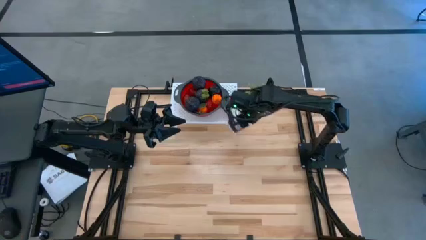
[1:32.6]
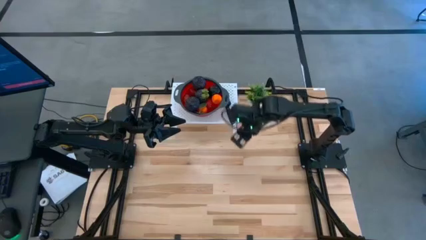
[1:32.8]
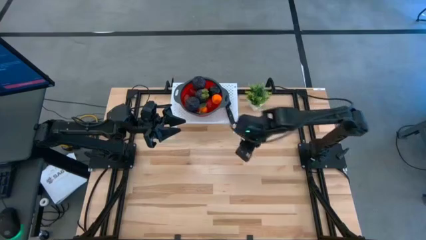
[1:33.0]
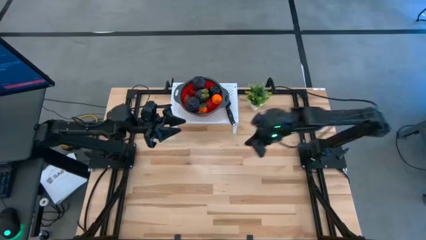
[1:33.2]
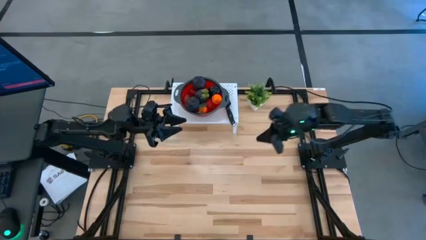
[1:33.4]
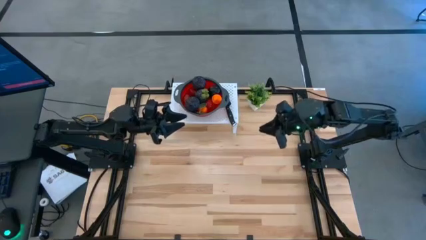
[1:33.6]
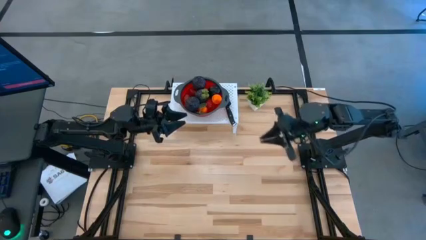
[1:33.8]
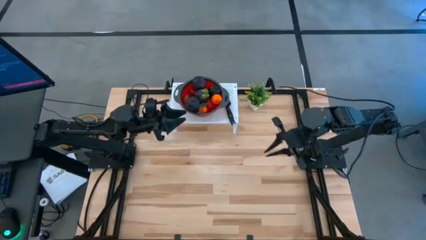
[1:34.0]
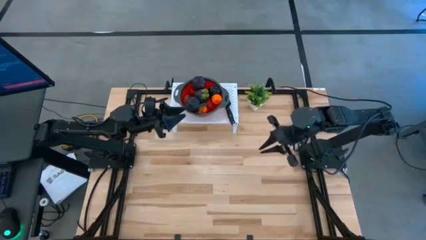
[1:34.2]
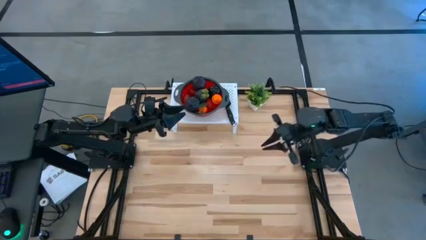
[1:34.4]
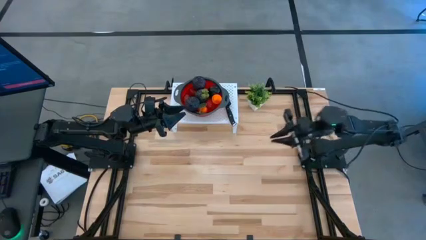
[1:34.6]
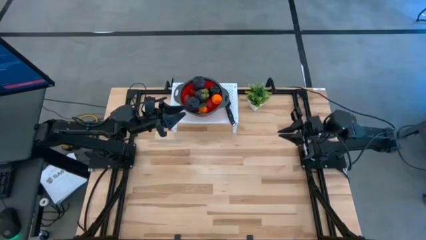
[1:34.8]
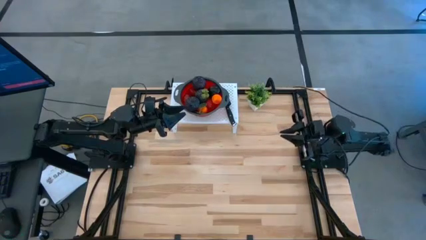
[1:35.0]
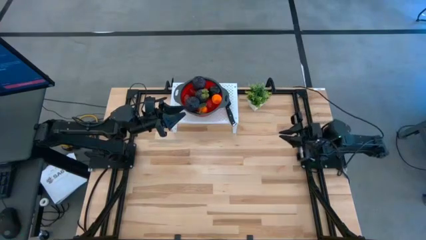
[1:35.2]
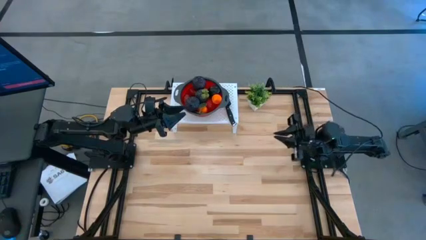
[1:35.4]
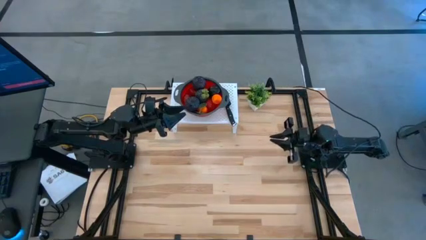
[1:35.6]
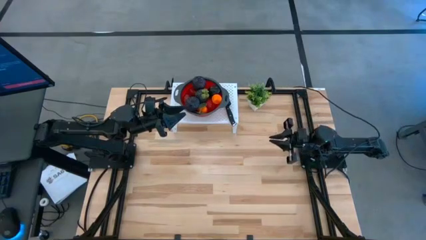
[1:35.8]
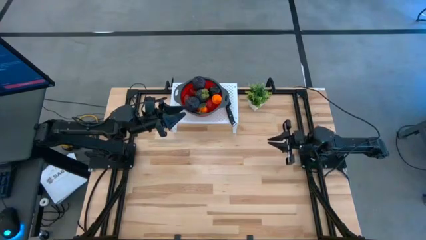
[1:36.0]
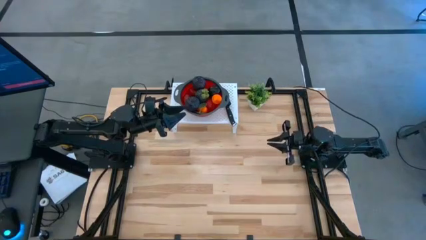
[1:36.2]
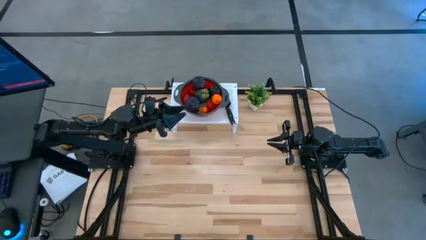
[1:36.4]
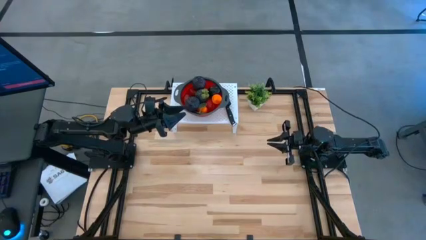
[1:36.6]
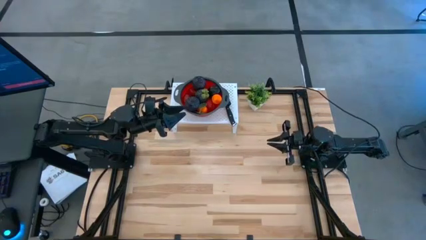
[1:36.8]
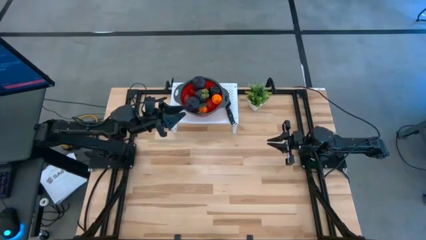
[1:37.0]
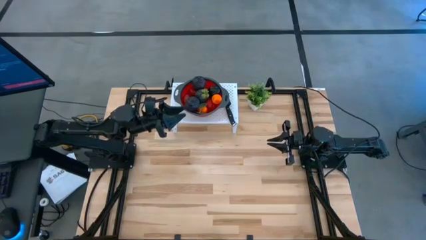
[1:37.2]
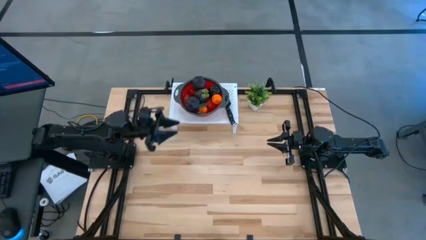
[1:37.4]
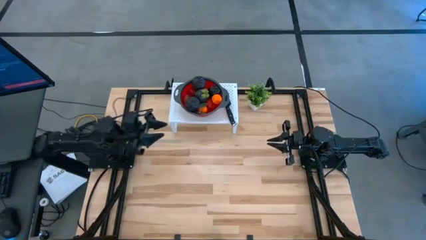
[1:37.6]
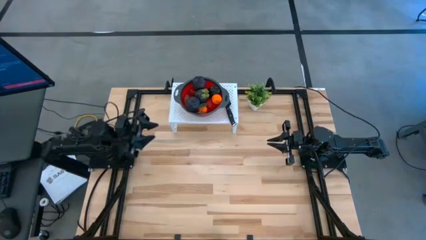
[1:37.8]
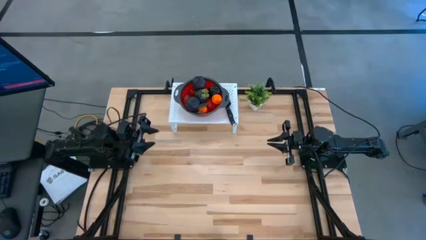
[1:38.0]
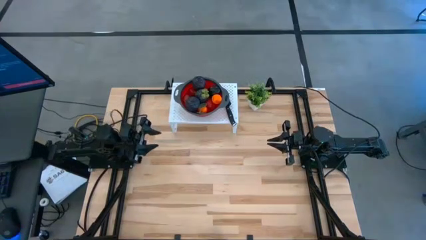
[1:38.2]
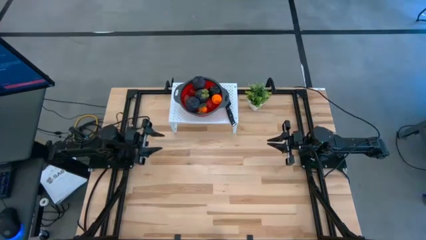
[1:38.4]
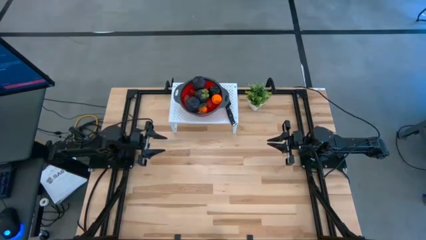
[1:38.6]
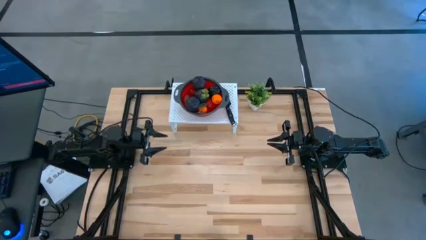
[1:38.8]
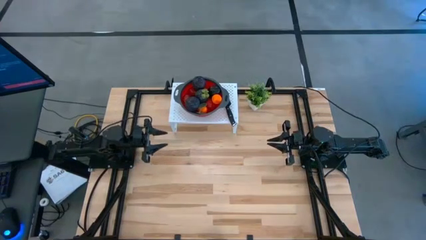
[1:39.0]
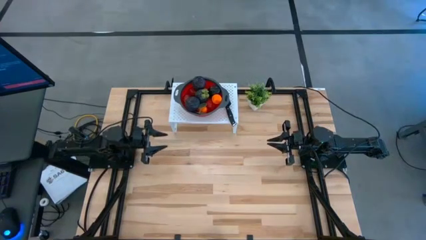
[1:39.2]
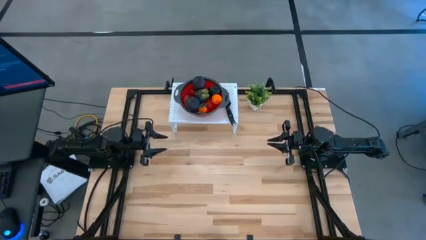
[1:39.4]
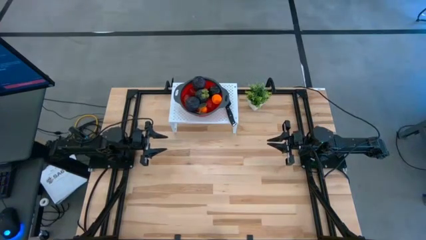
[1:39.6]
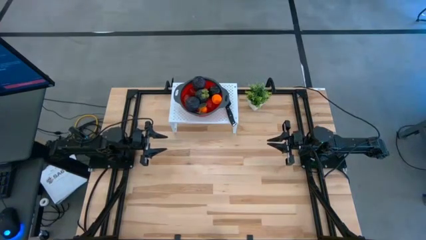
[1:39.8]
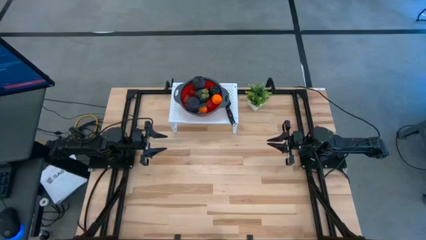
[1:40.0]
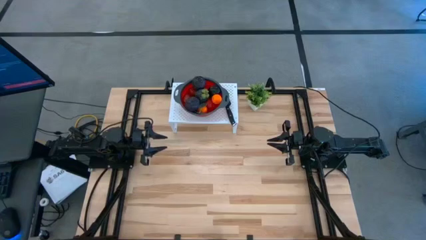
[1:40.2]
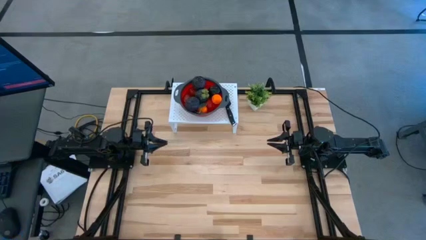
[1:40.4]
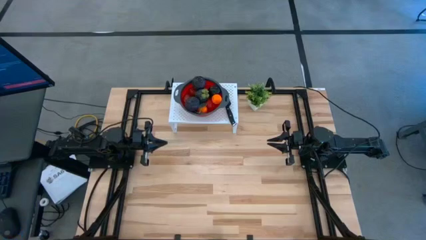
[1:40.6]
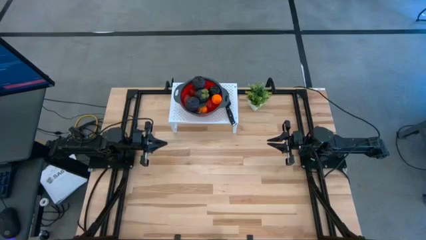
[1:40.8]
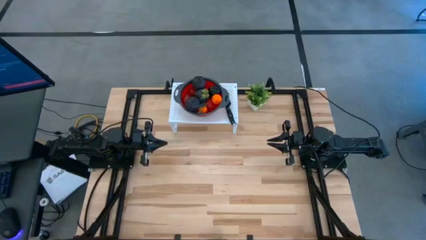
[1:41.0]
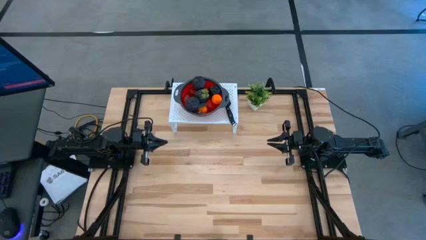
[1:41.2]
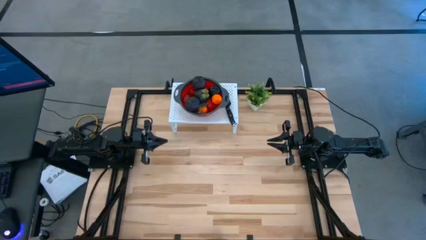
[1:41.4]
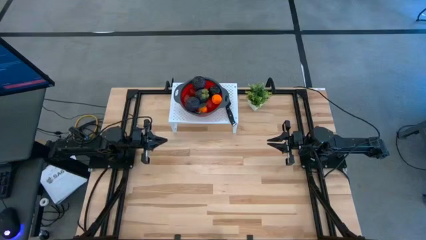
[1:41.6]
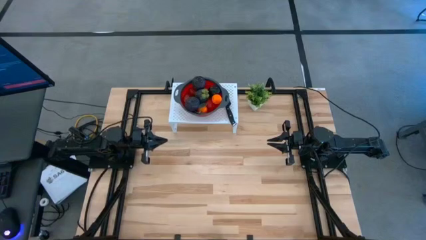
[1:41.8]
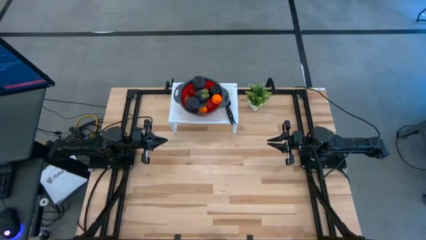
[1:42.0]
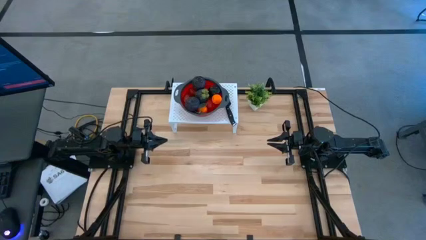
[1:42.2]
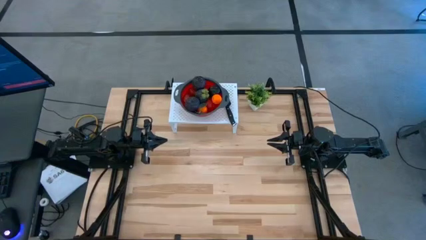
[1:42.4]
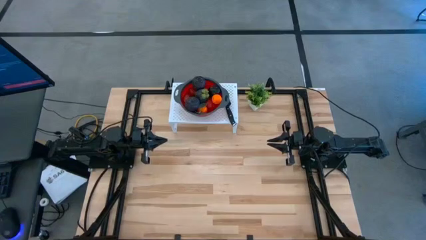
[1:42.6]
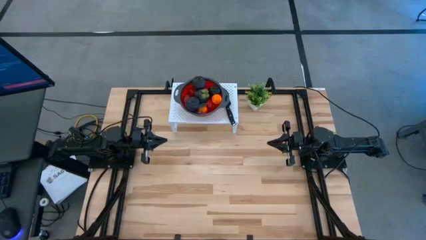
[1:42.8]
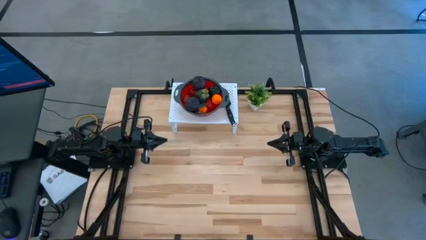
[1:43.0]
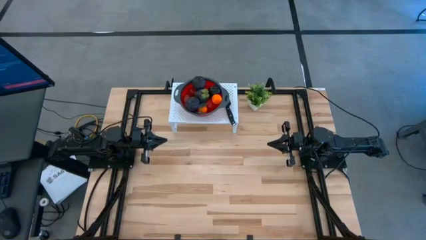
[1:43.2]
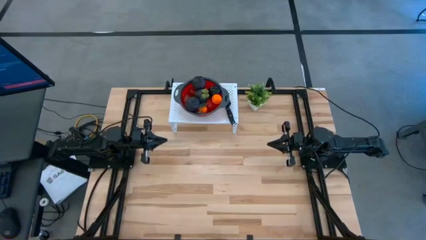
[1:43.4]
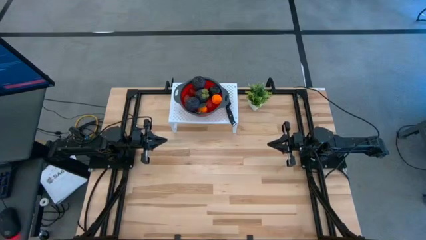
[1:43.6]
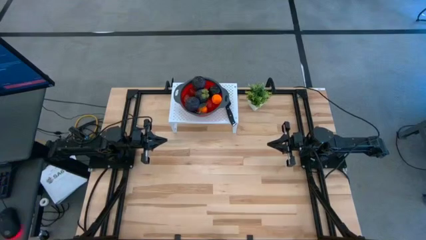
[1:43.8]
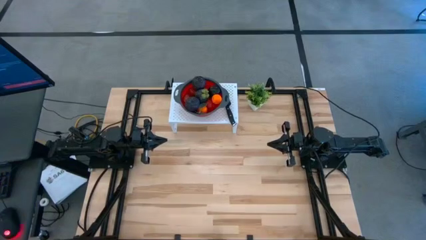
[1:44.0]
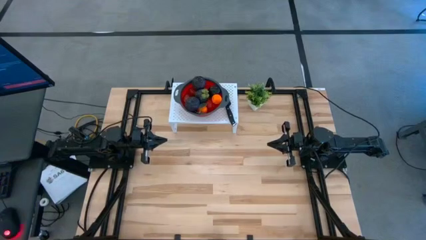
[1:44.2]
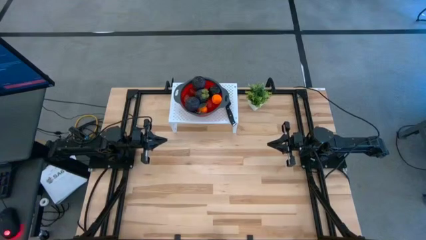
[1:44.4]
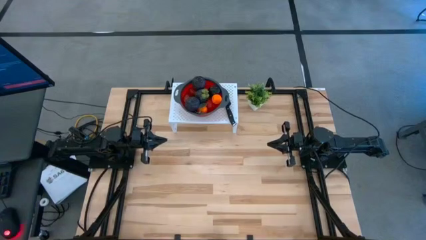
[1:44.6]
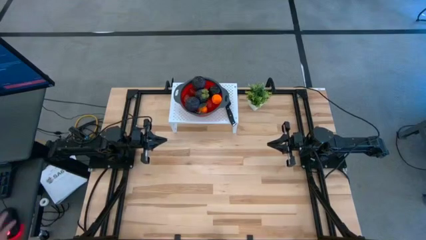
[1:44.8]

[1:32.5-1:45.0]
Task: Pick & Place Fruit
Return to Home Position

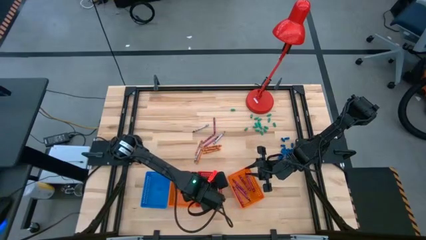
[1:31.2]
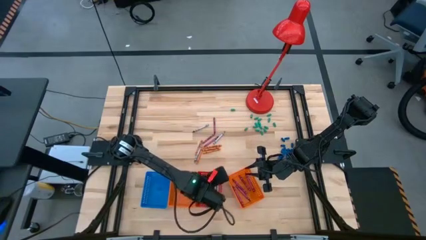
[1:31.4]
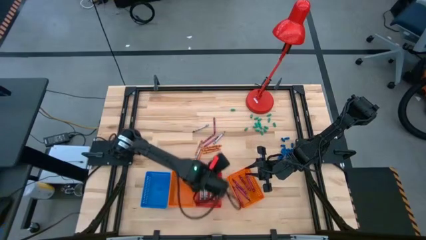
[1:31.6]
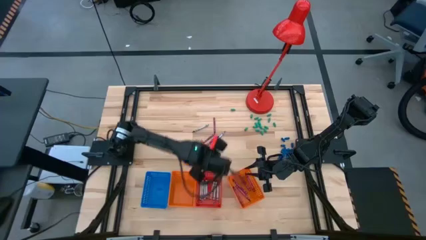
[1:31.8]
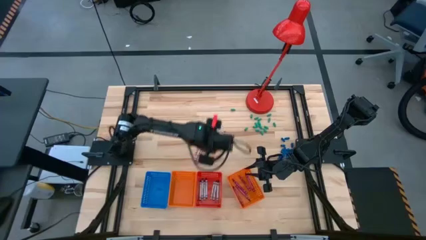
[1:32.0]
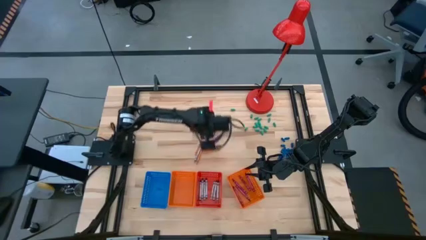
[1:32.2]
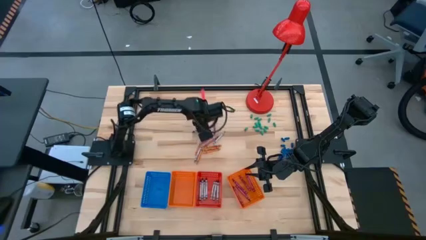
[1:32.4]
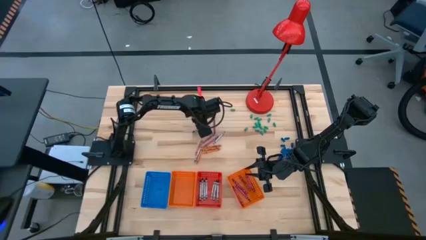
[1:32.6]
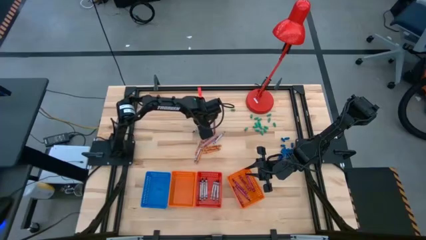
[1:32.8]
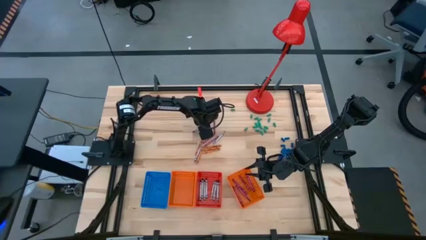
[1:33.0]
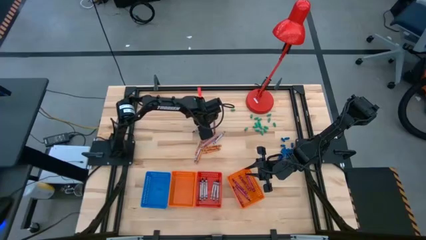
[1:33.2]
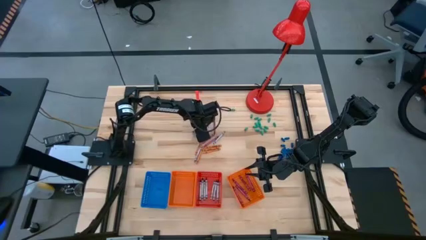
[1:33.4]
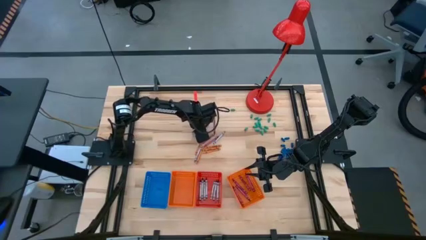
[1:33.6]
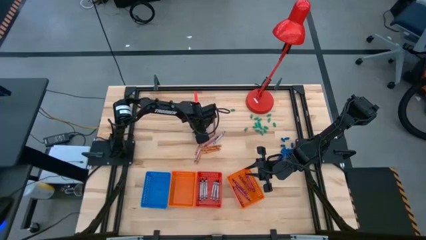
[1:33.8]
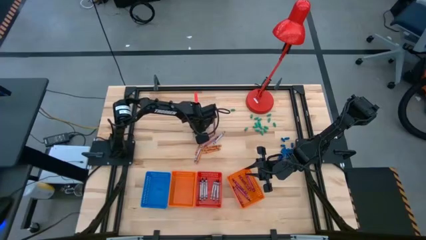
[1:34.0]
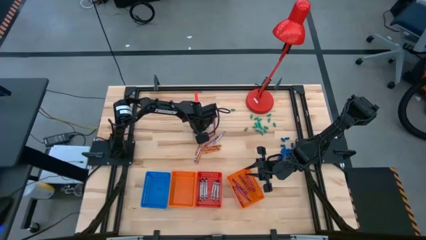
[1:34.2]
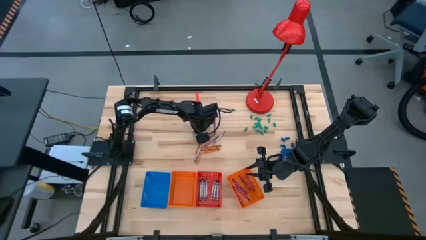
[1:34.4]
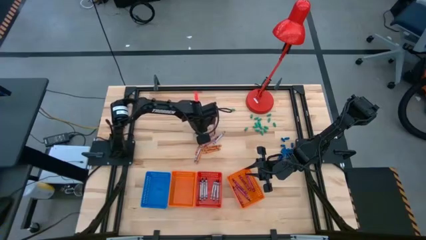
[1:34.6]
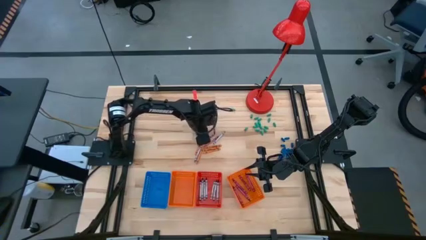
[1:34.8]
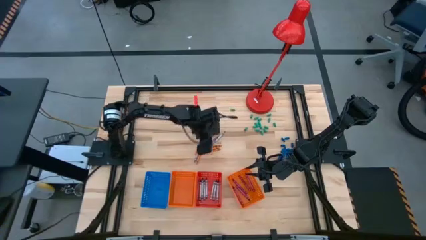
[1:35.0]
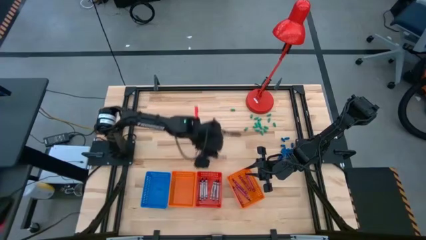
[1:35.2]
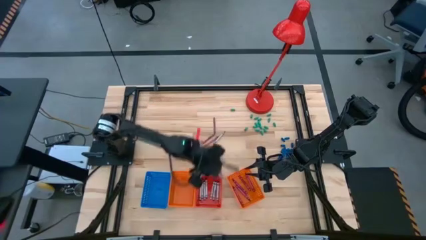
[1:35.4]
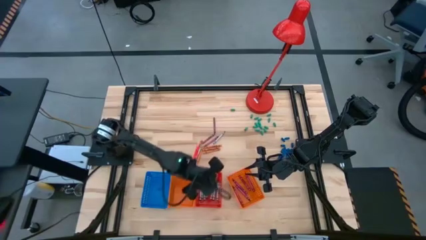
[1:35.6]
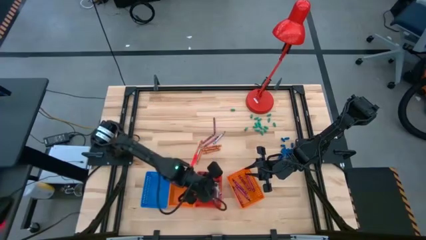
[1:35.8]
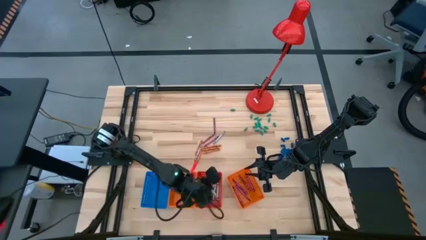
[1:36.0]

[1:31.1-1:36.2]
Task: Sort crayons
Put the black crayon into the red bin
